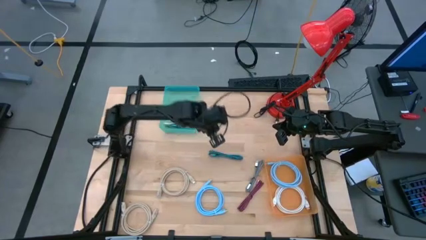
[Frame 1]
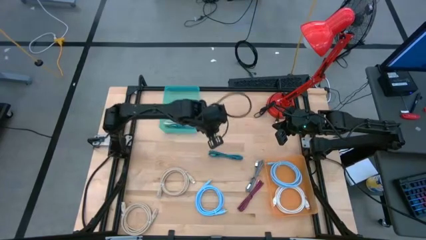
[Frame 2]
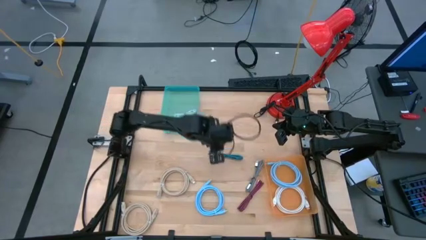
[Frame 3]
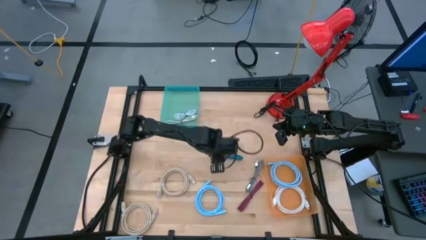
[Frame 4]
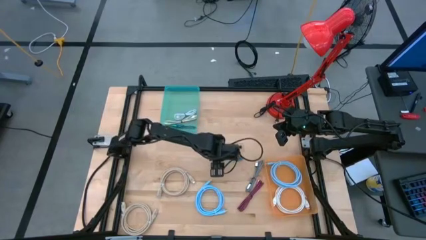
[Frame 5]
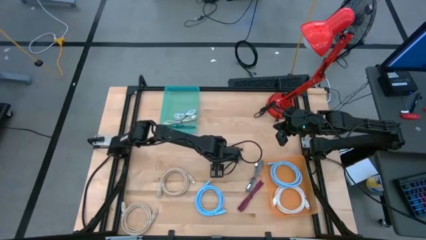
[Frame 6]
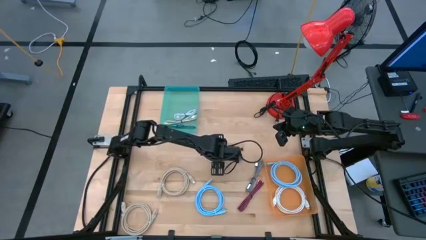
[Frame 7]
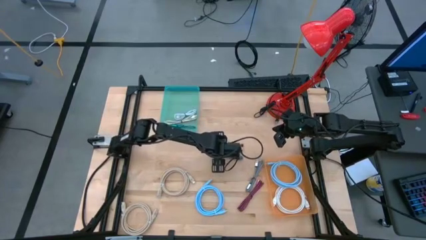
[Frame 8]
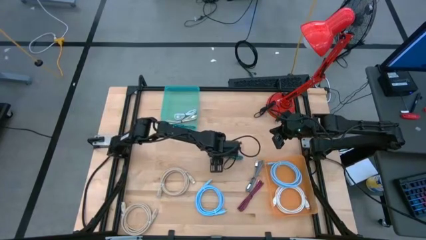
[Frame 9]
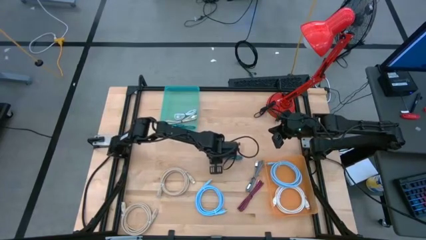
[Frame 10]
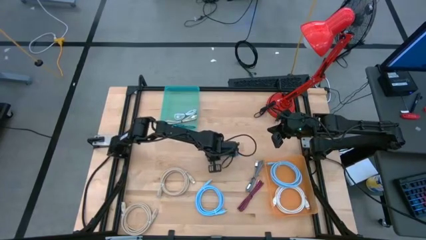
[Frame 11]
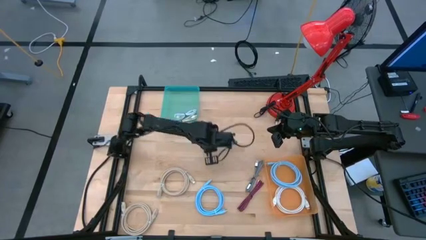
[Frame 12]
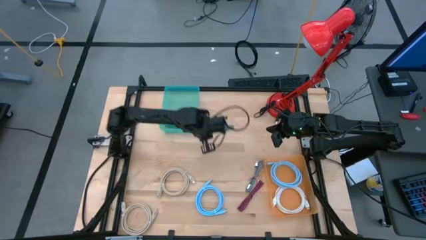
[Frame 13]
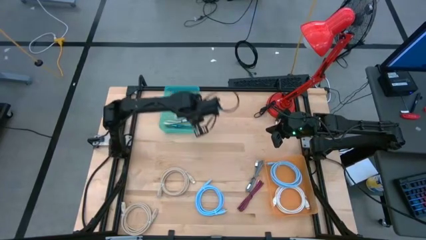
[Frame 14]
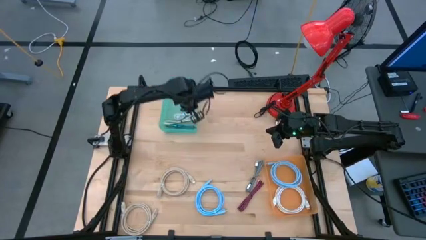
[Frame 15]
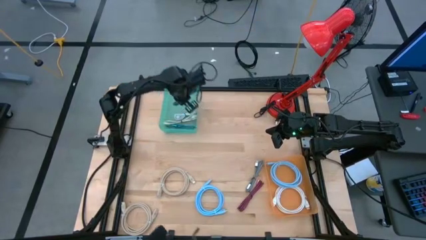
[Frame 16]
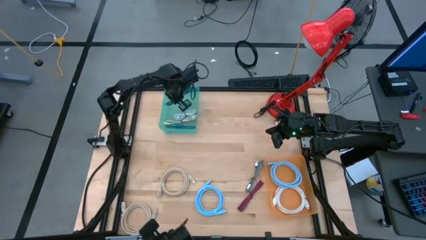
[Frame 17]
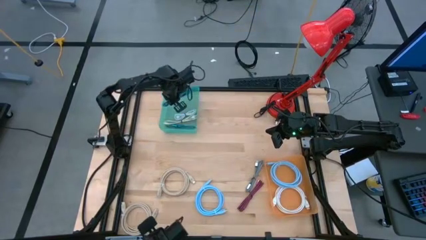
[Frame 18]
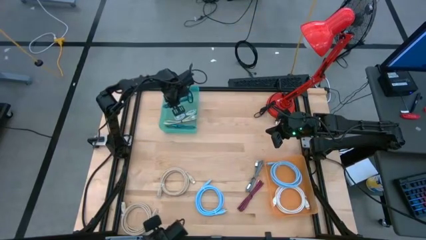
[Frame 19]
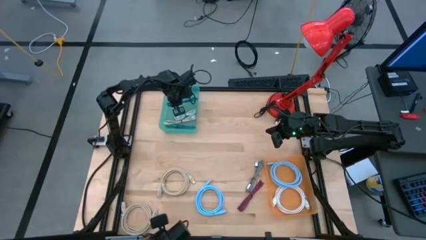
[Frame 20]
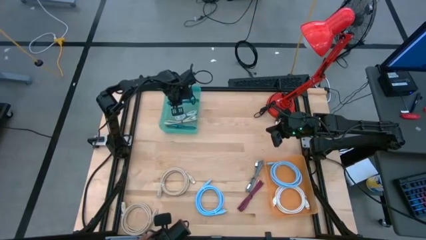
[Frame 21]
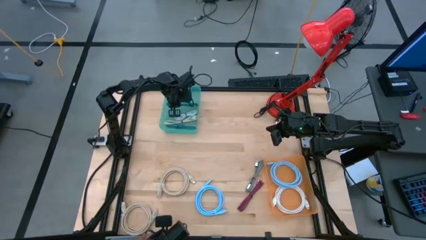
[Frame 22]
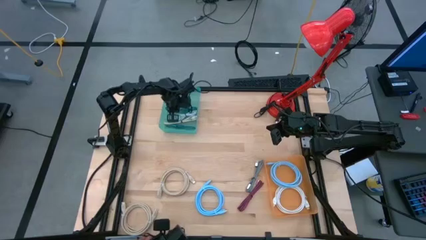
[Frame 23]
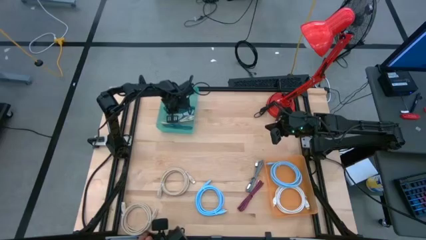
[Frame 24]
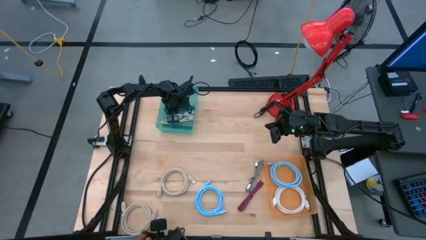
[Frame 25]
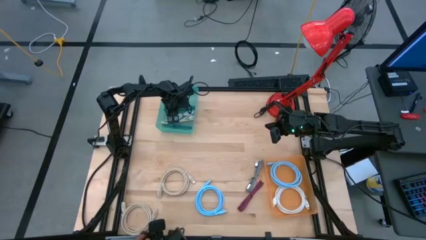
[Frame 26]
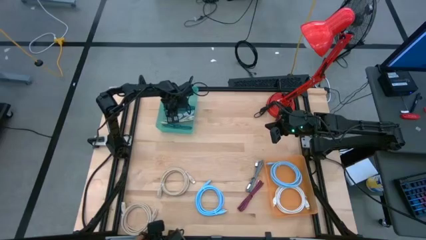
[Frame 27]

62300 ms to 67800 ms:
Task: Pick & Place USB Port
Put the top blue USB cable into the blue bin

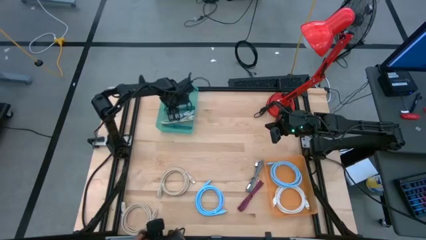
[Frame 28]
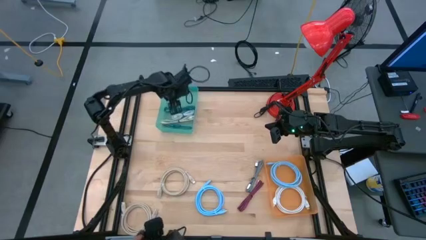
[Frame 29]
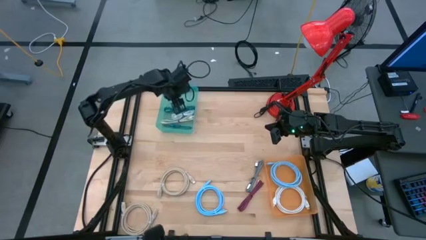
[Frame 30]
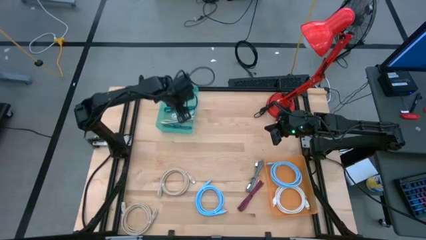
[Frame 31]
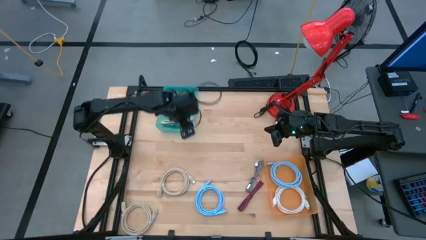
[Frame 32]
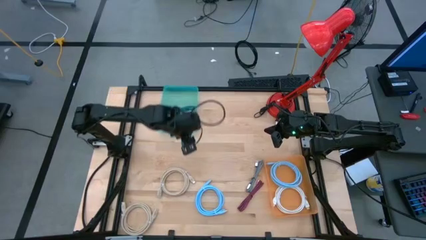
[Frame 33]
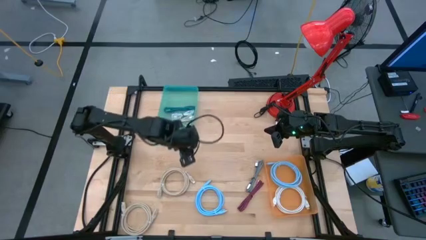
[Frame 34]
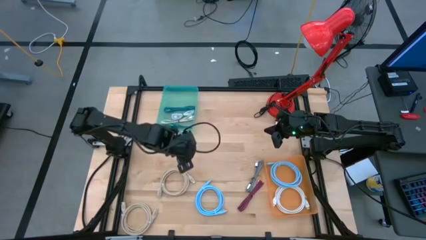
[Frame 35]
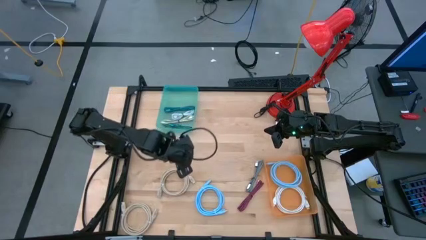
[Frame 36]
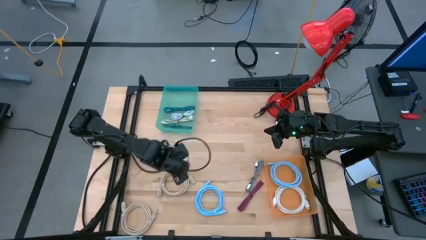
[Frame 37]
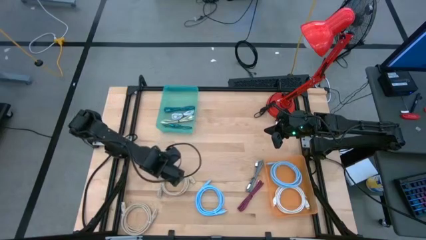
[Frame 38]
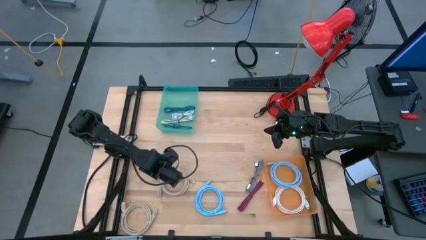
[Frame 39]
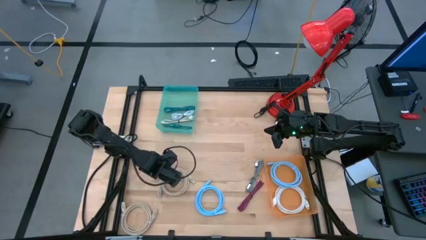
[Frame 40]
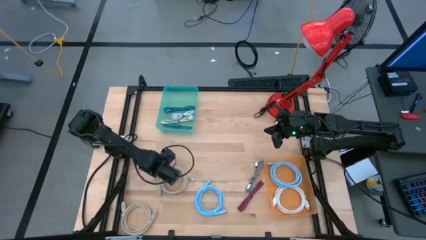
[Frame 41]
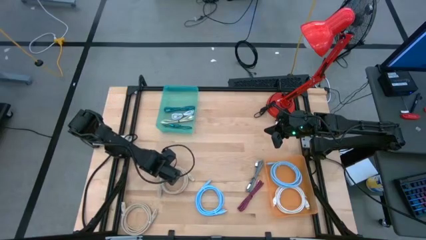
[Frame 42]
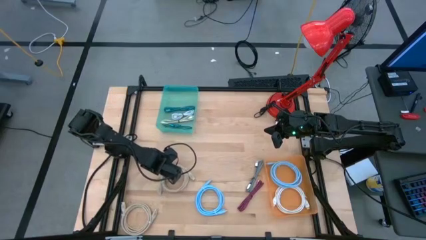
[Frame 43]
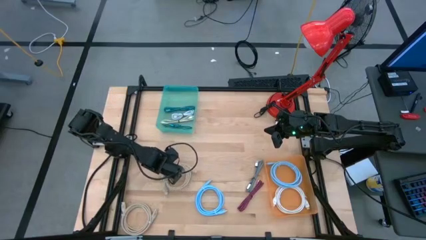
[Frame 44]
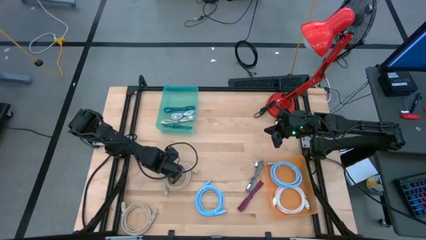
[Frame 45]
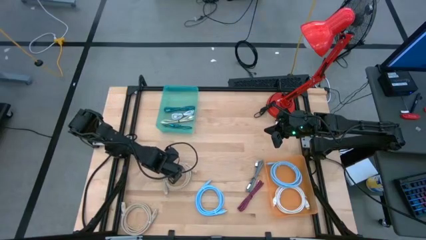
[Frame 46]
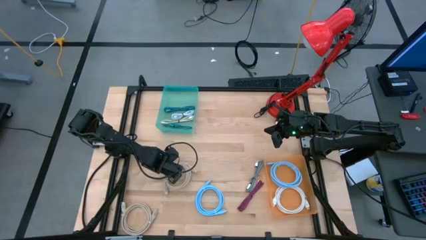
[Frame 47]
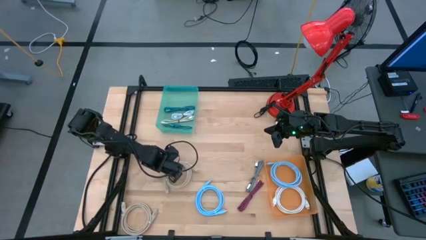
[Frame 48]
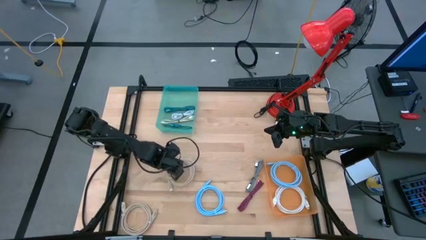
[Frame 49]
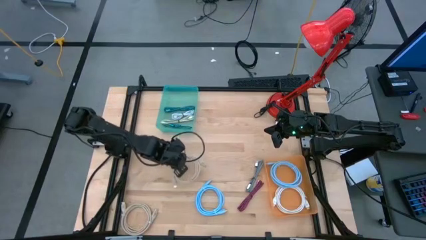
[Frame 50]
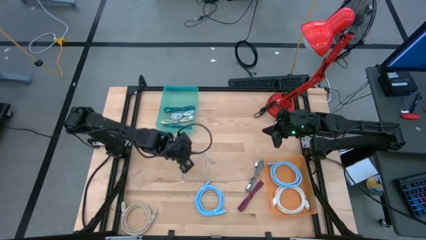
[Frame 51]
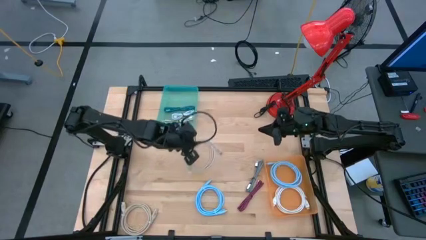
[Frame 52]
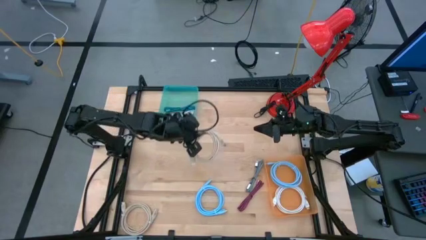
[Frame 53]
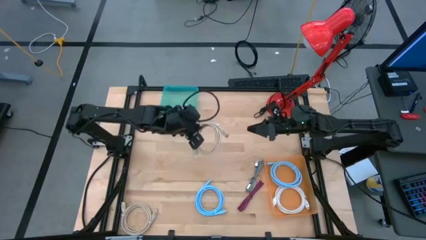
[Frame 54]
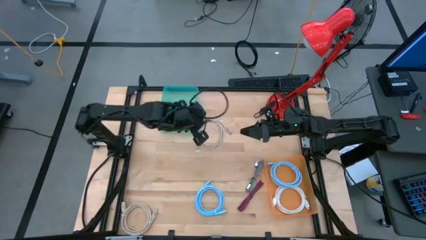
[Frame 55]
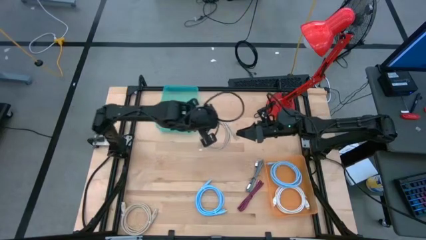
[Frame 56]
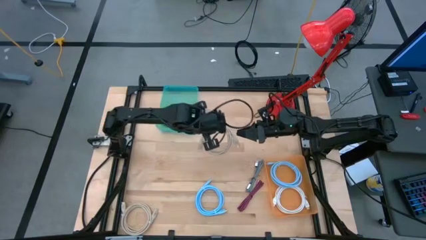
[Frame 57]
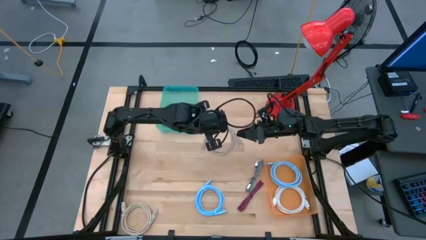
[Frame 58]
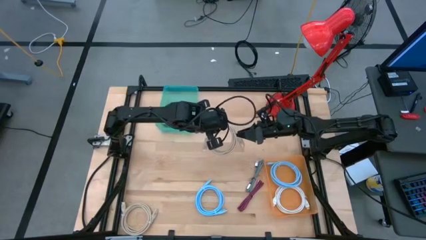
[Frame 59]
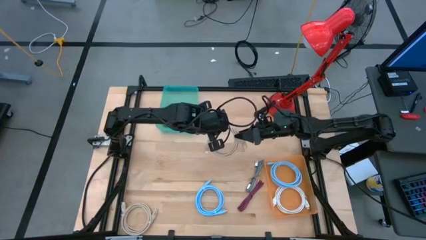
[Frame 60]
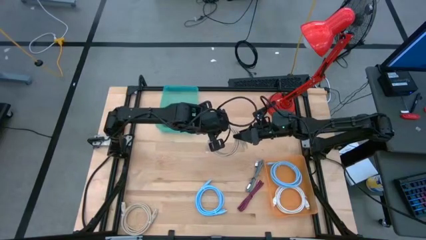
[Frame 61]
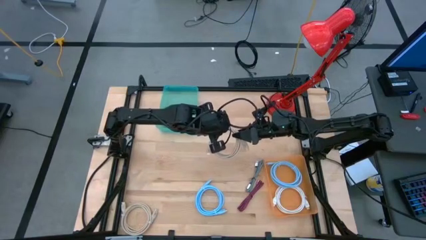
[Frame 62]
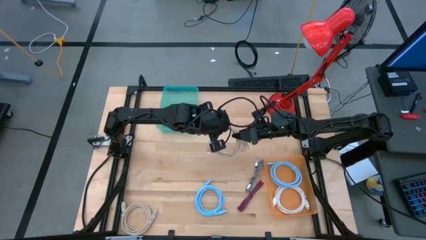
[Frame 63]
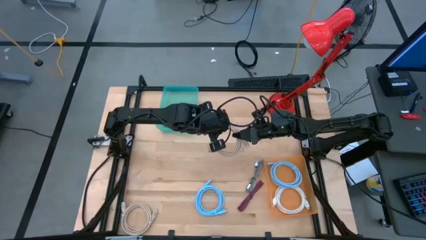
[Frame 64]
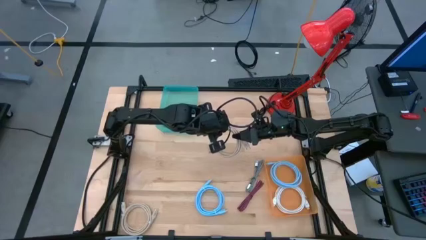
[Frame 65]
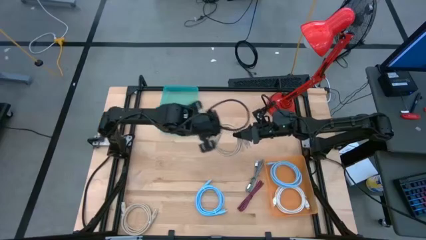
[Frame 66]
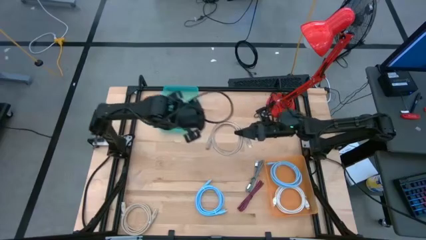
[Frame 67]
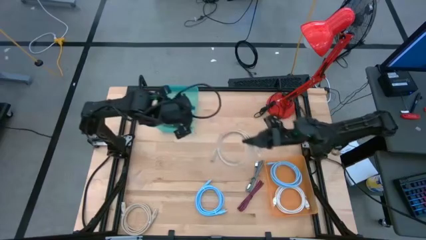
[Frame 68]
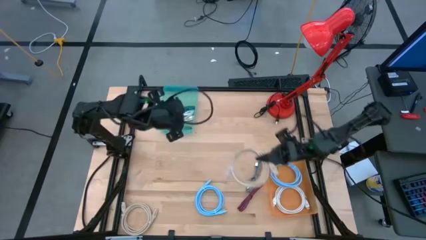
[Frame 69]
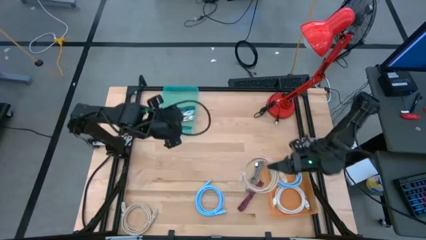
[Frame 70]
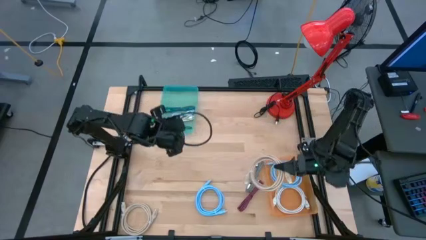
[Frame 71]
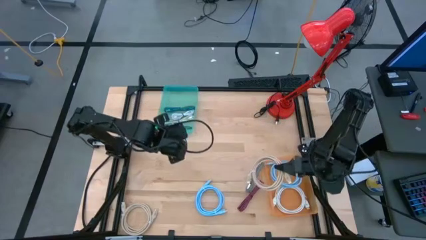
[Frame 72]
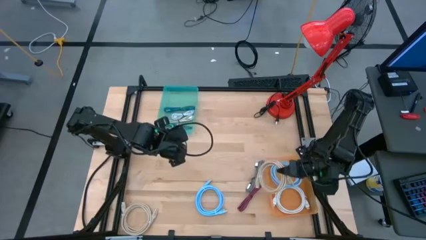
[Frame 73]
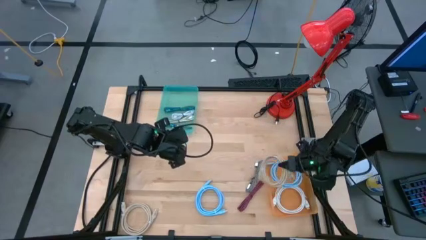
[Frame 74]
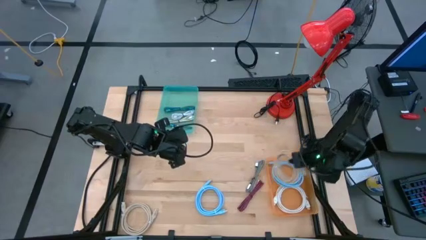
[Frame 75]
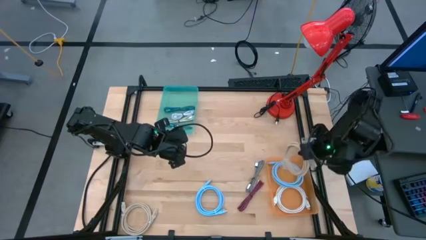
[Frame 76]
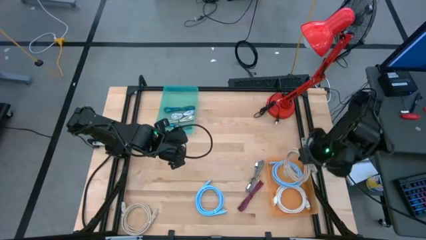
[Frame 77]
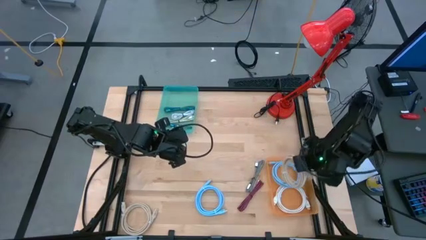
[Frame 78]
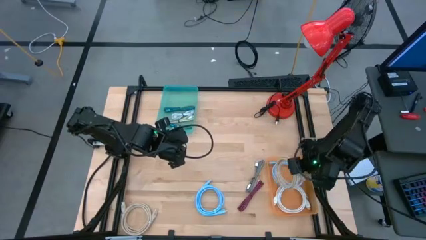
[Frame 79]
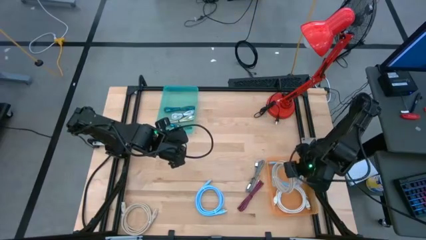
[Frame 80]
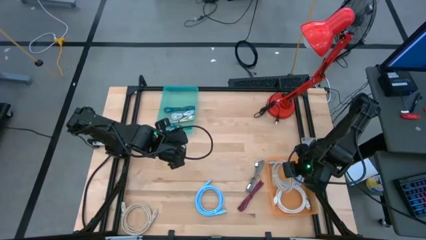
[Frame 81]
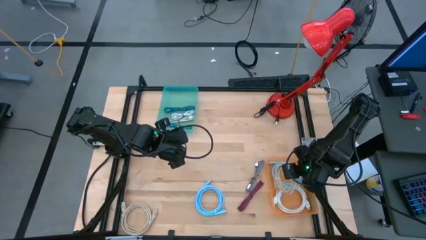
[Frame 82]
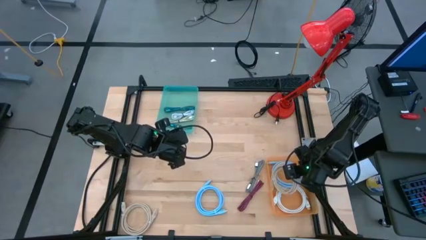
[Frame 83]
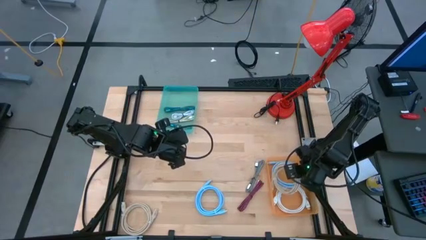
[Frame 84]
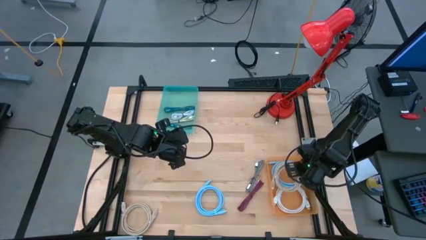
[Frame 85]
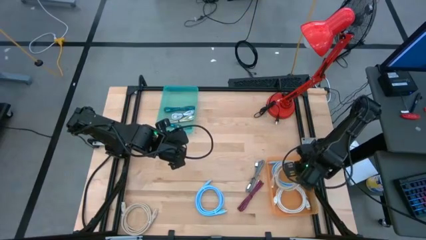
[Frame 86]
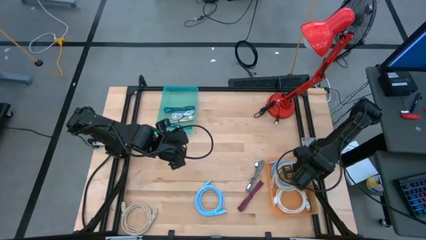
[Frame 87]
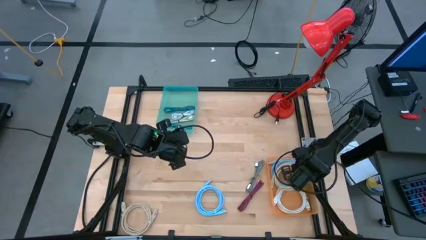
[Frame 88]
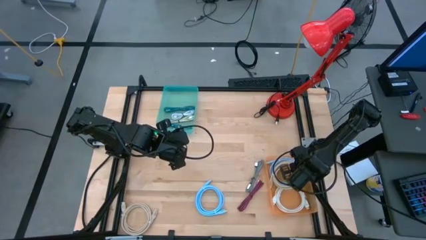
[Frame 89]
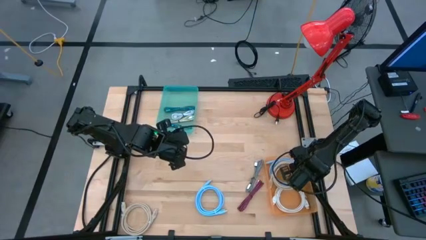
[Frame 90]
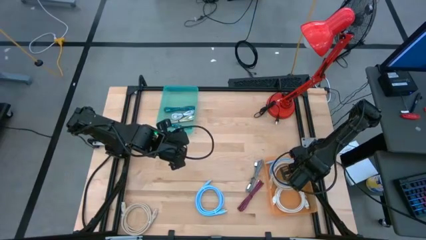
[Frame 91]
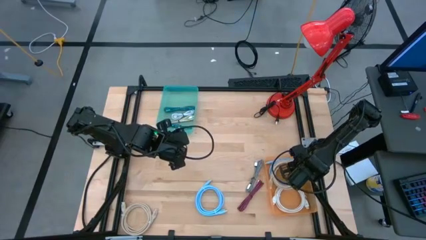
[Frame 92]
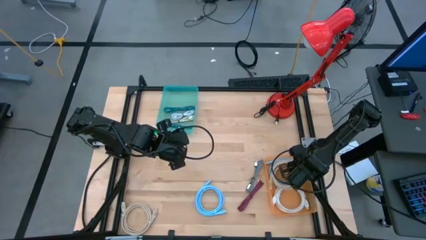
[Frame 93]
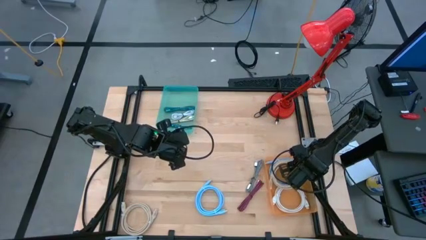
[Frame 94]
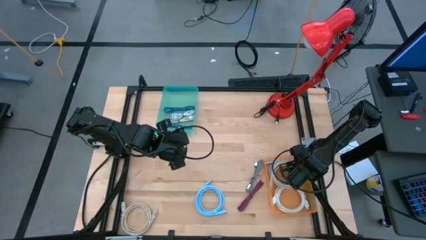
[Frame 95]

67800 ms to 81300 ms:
Put the top light brown HDMI cable into the orange bin
